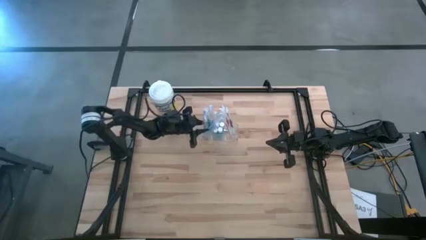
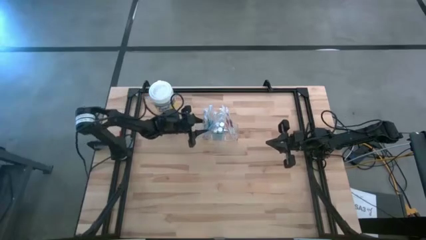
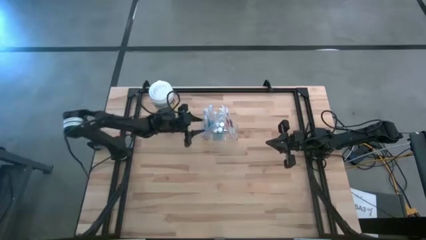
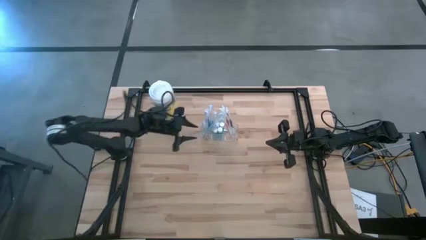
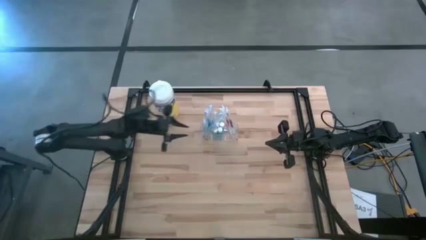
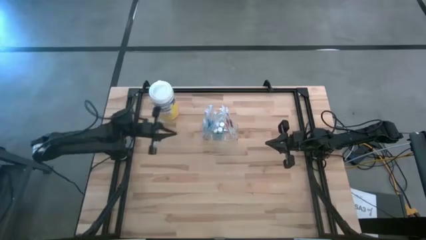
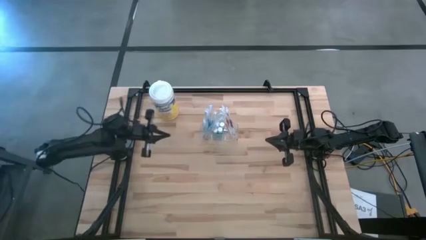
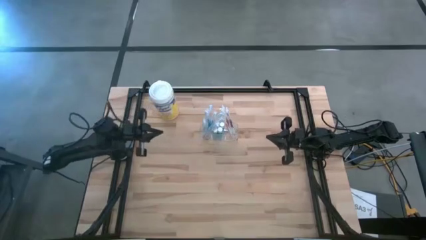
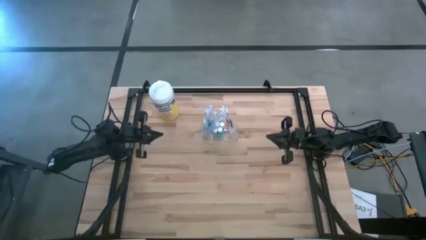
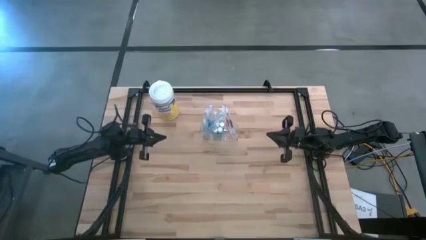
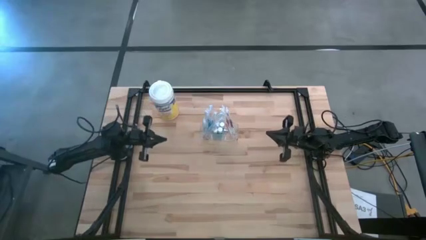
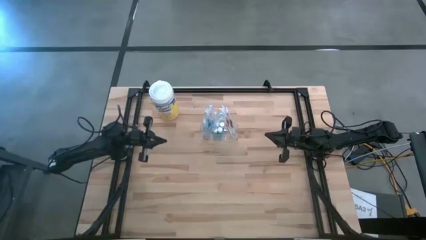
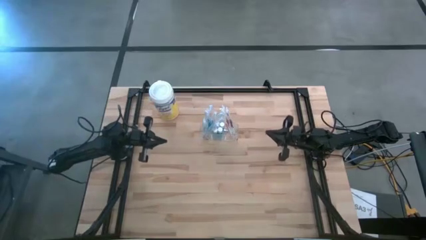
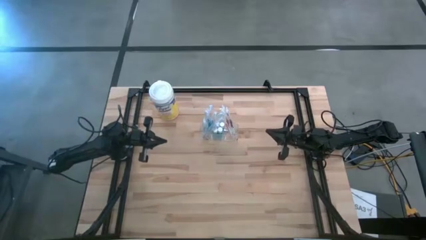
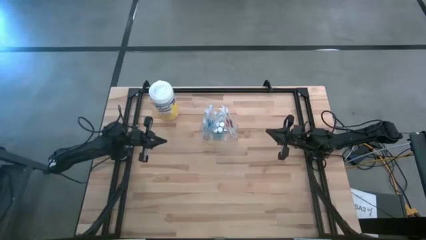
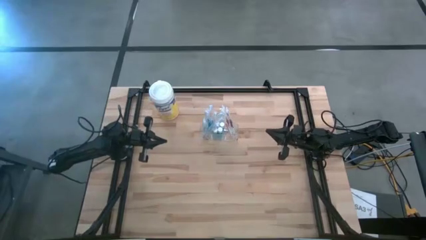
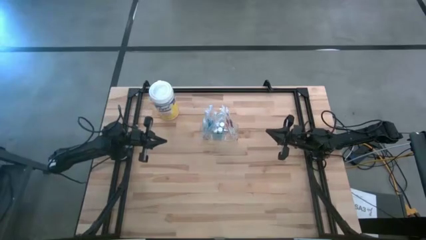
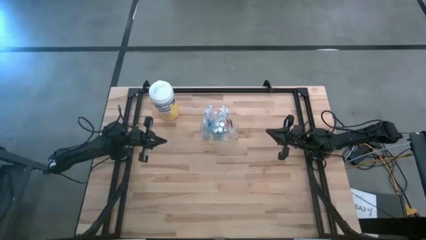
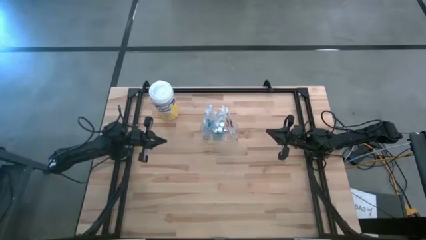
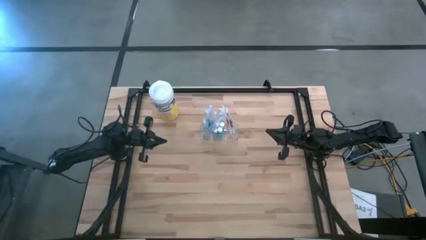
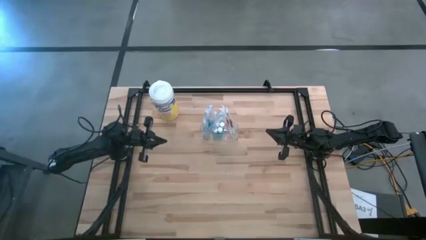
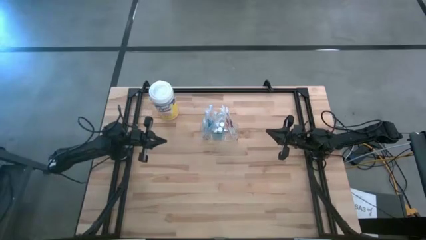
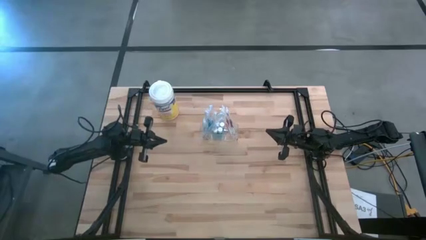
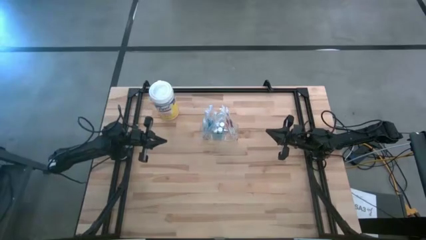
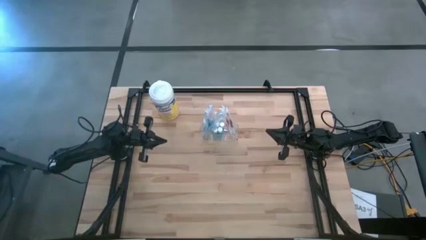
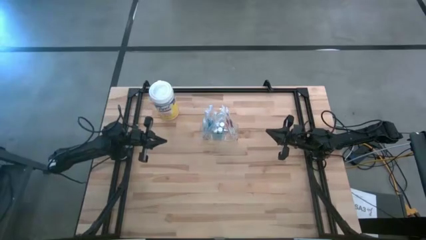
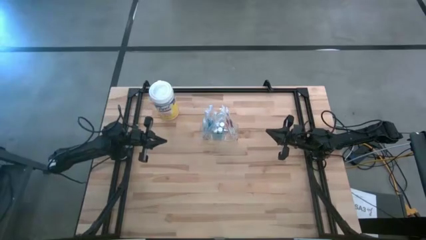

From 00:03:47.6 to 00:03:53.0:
Task: Pick & Place toothbrushing station
Return to Home Position

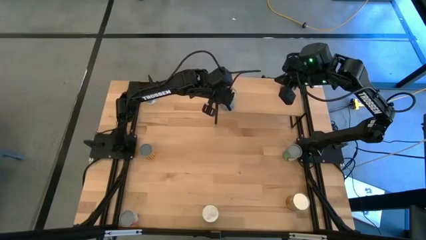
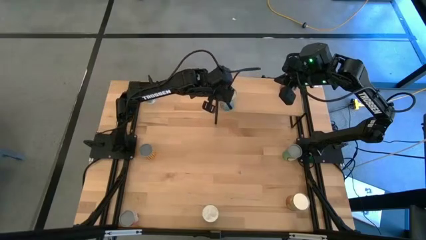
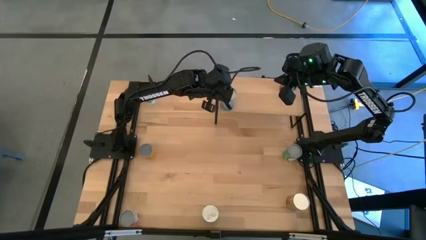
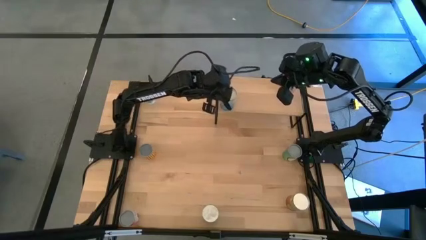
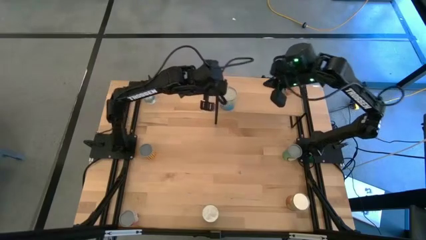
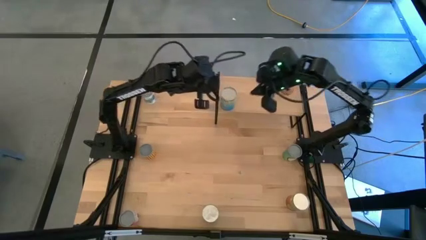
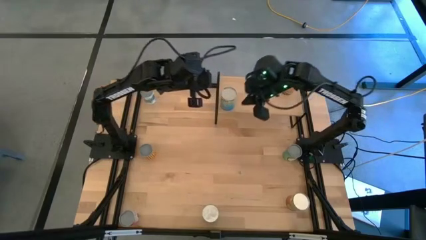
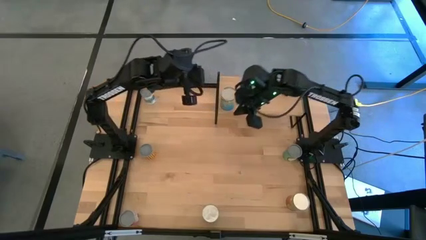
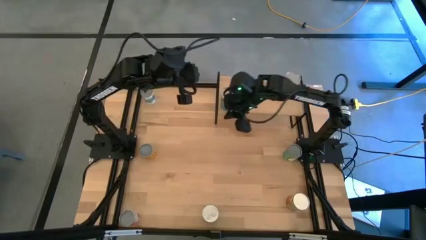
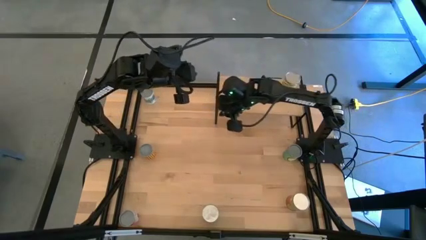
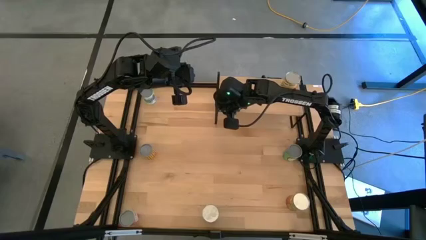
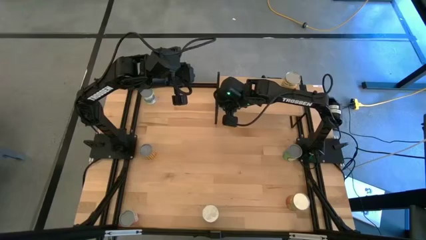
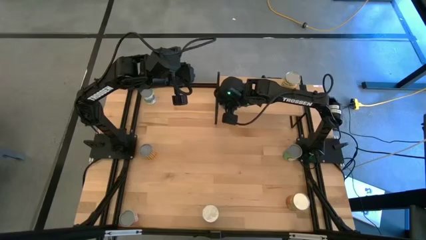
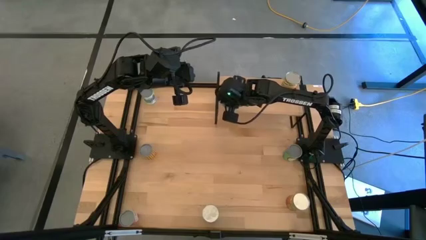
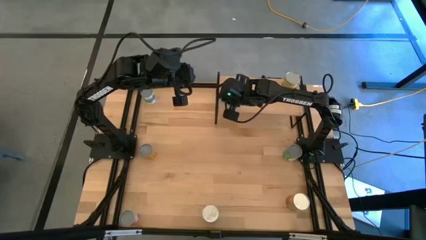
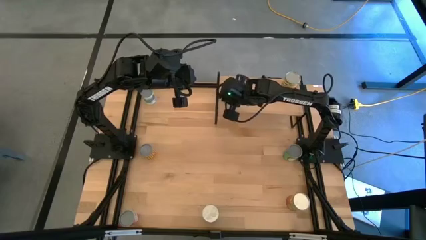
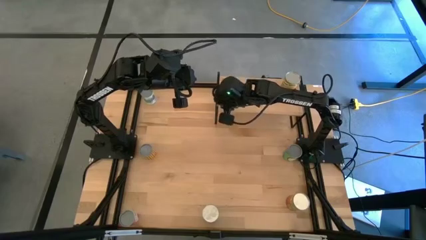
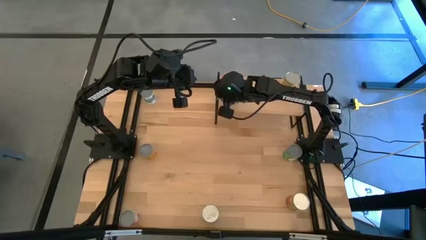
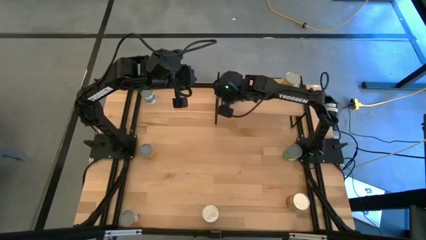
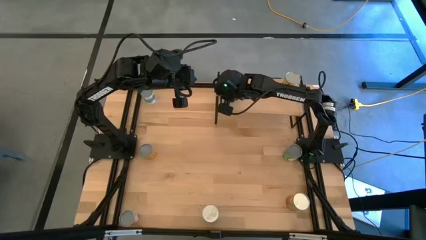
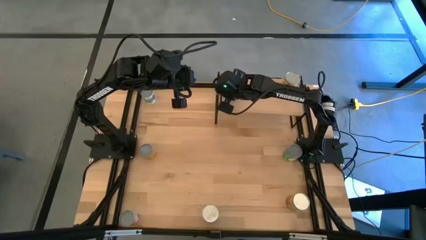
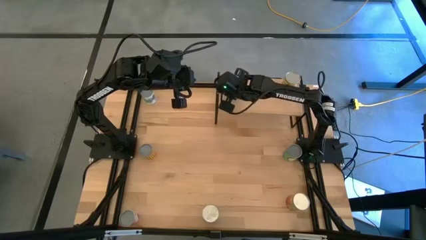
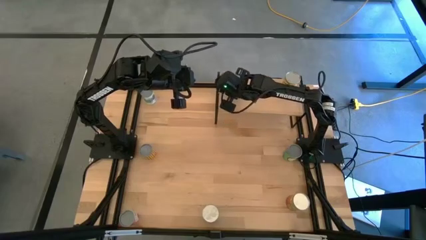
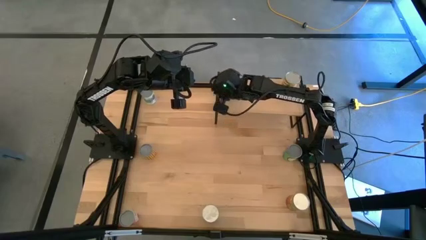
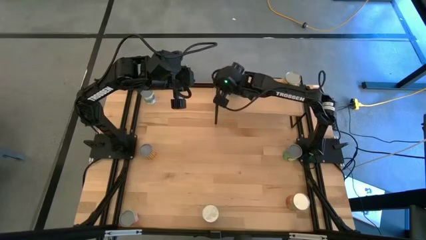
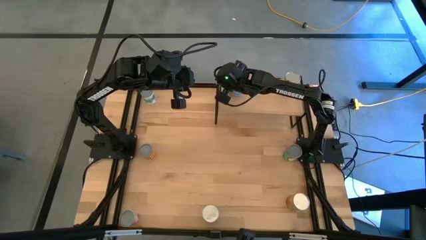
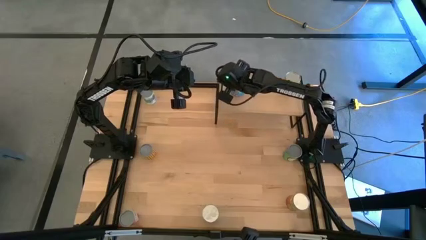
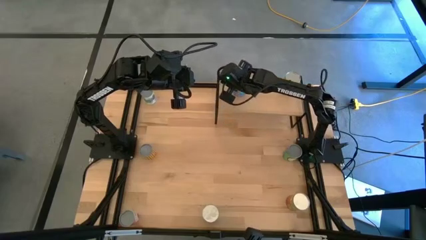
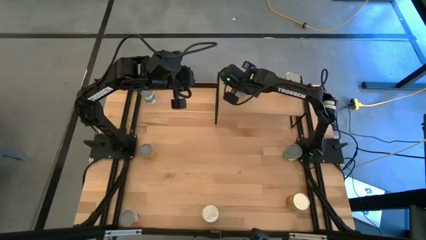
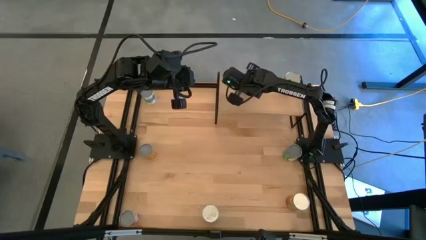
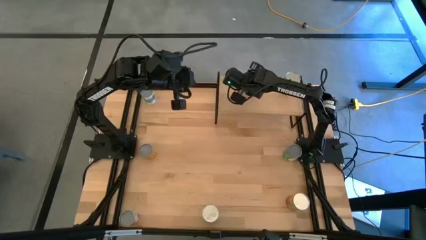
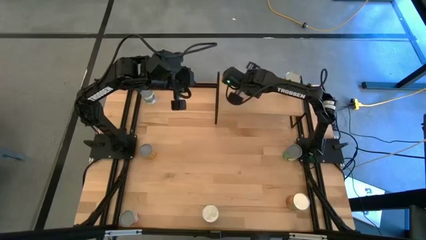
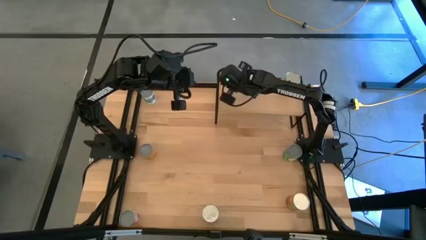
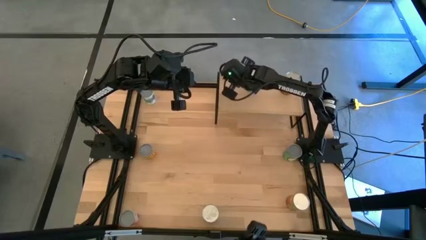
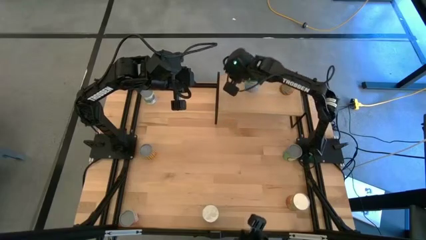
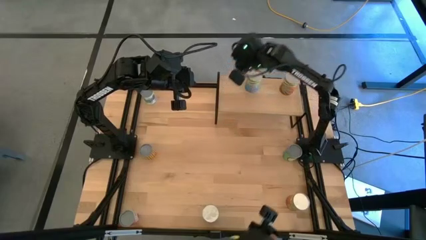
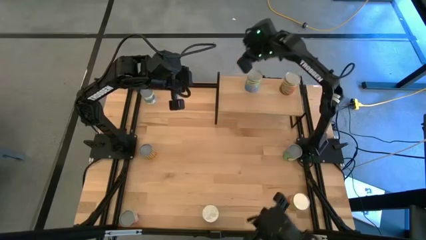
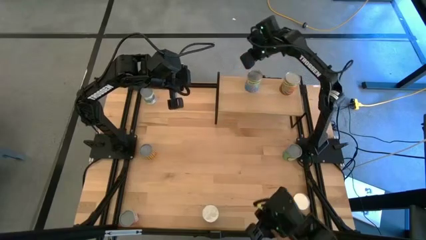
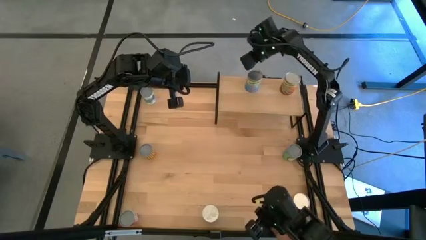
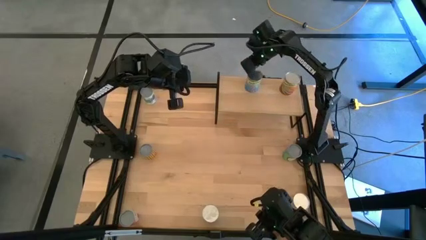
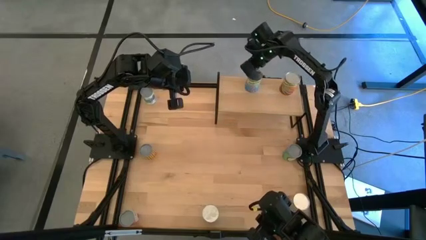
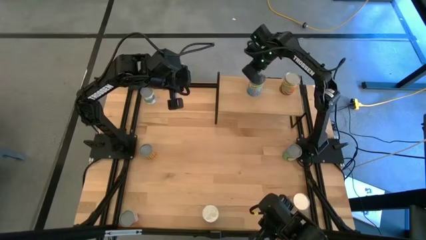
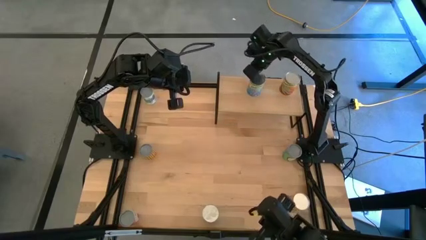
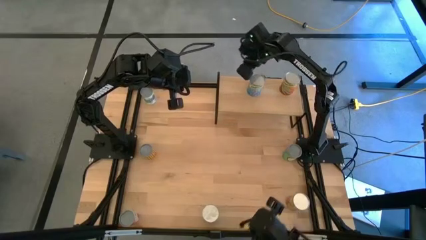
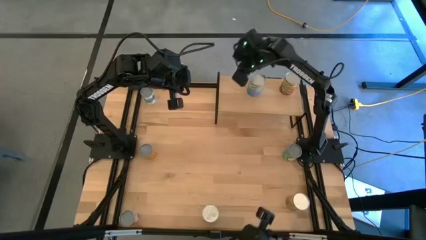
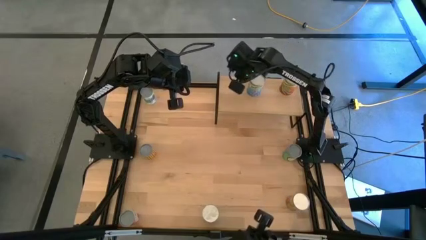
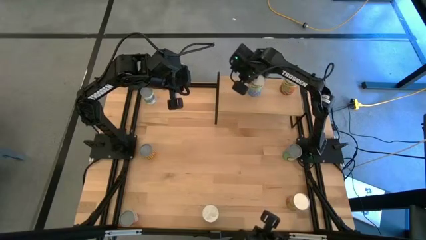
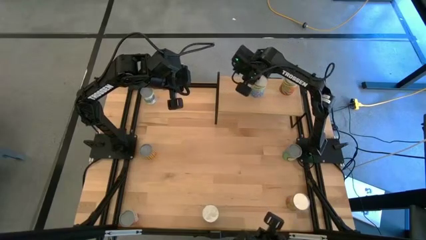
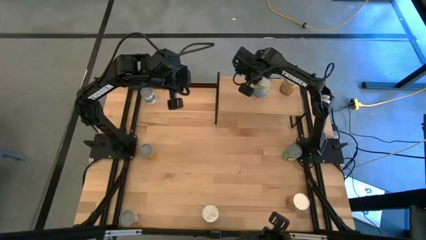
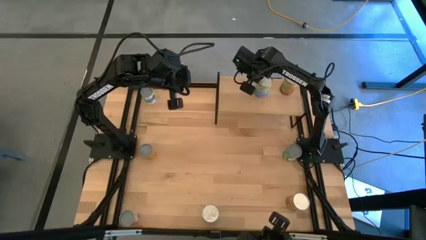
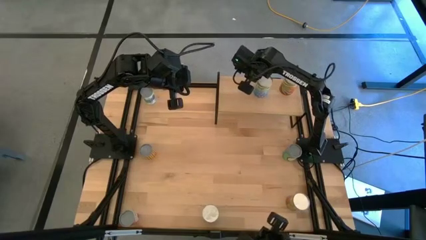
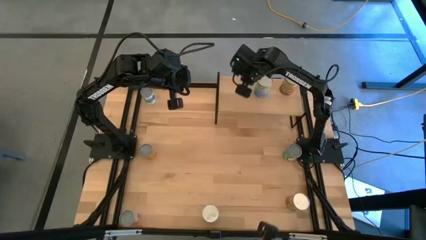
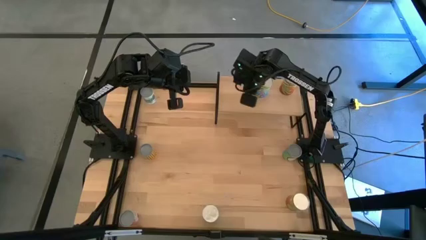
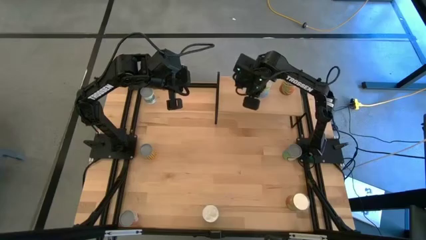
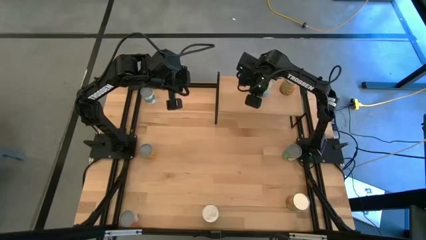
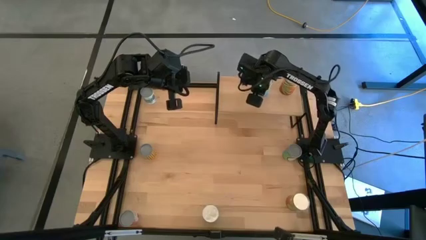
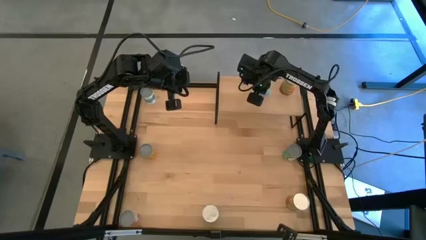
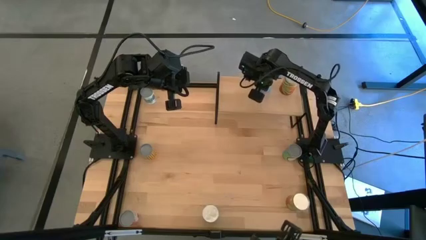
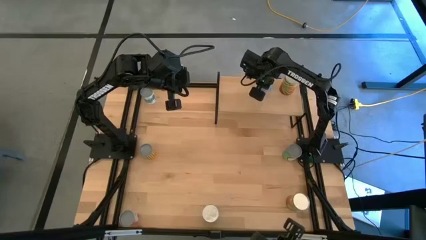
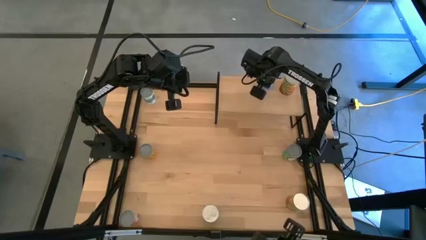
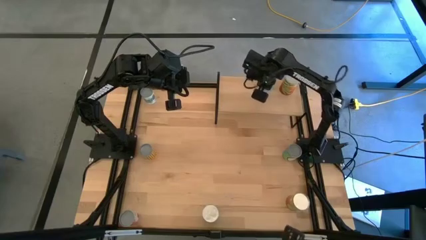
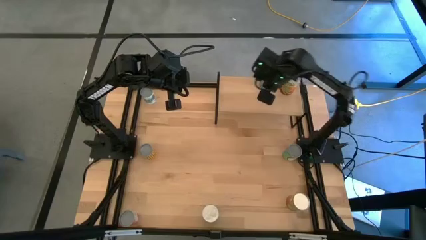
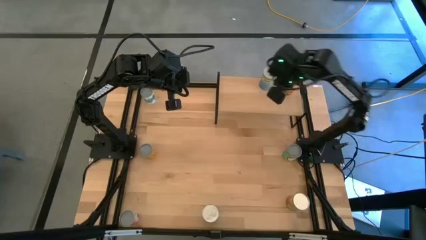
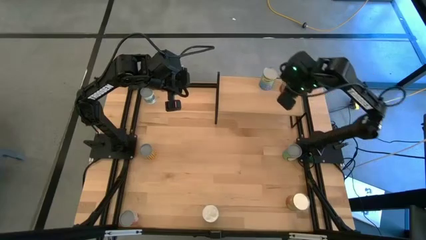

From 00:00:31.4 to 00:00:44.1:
Task: Pick and place cans onto a shelf
Put the orange canned good on the shelf
